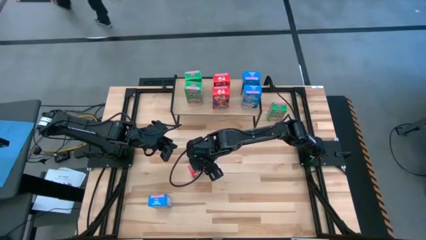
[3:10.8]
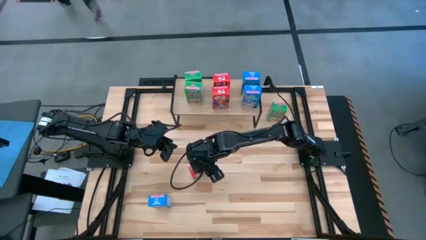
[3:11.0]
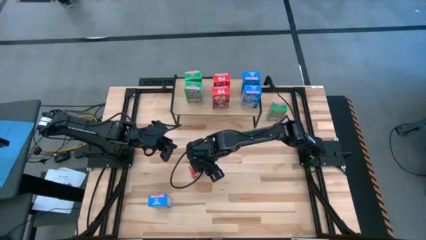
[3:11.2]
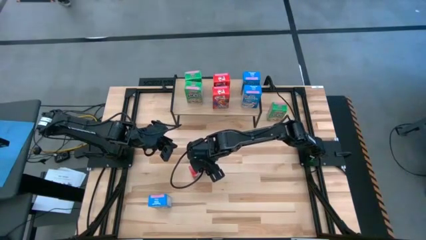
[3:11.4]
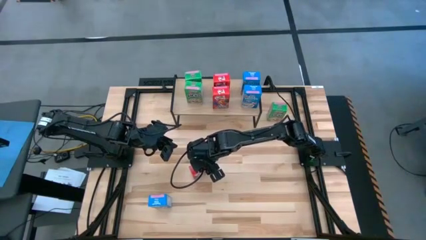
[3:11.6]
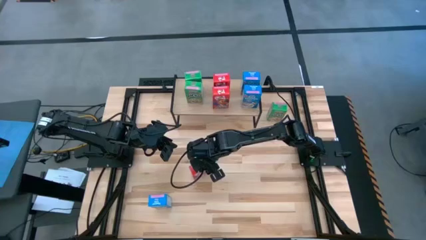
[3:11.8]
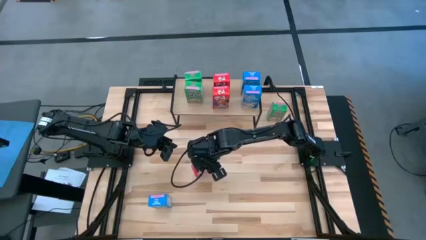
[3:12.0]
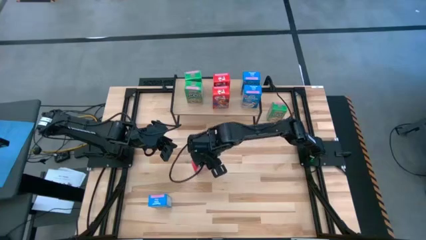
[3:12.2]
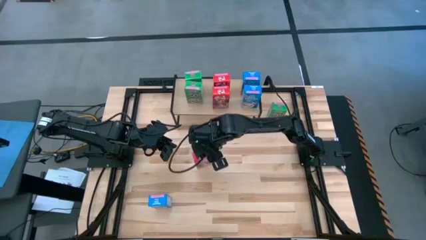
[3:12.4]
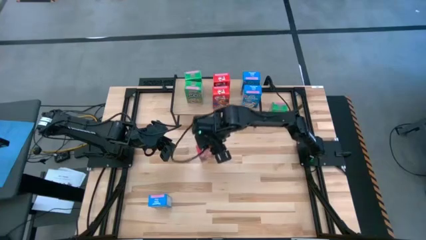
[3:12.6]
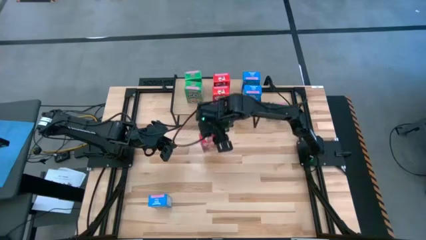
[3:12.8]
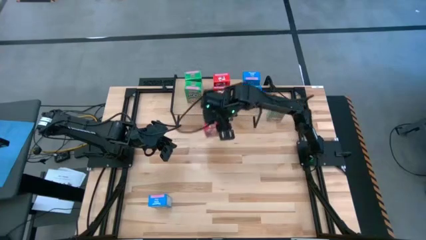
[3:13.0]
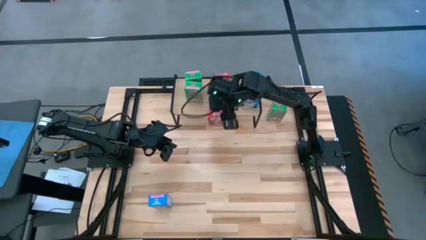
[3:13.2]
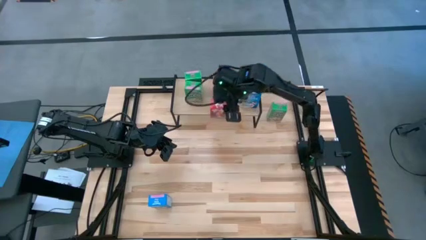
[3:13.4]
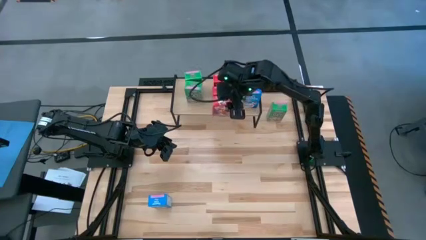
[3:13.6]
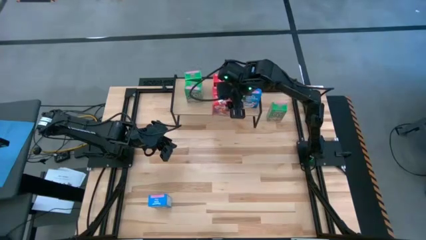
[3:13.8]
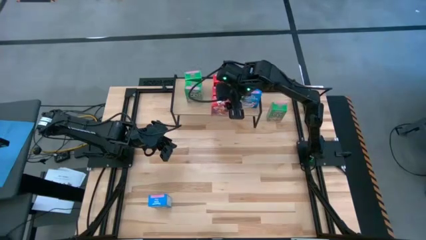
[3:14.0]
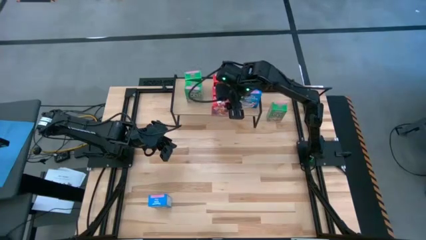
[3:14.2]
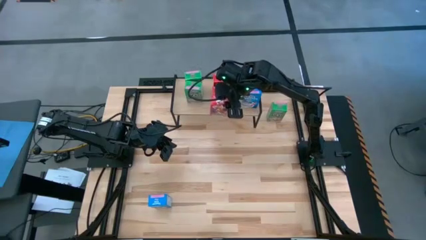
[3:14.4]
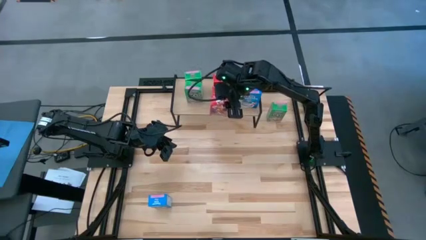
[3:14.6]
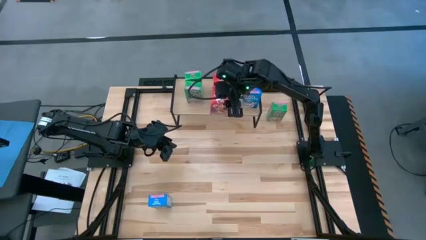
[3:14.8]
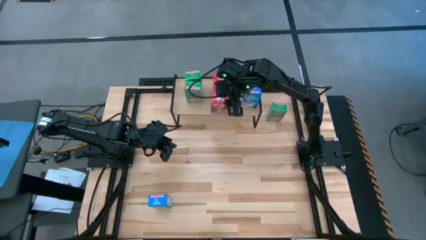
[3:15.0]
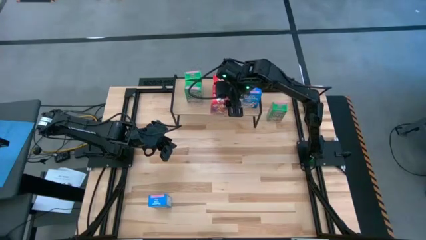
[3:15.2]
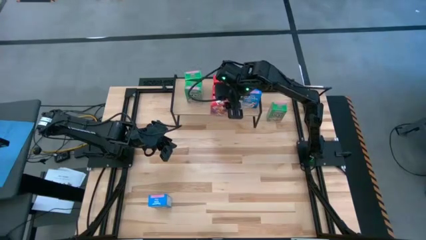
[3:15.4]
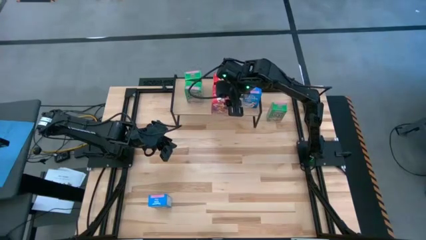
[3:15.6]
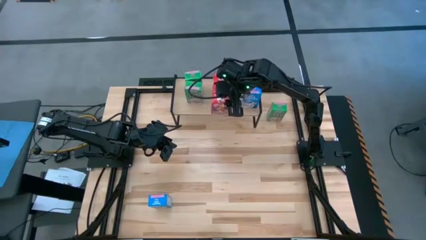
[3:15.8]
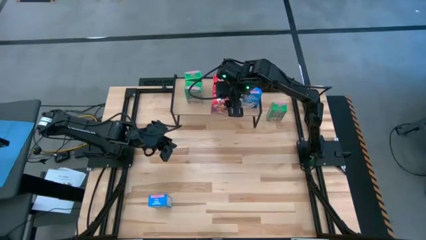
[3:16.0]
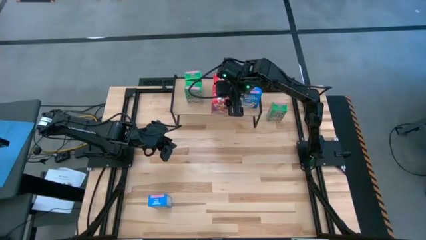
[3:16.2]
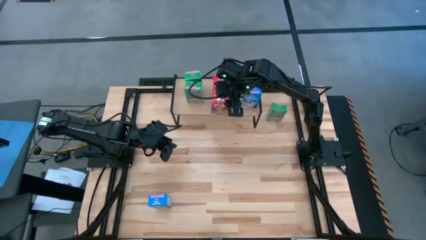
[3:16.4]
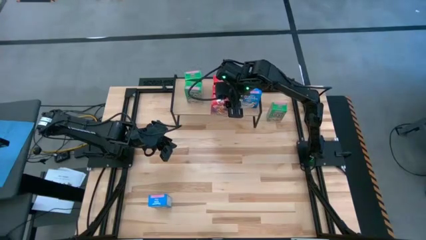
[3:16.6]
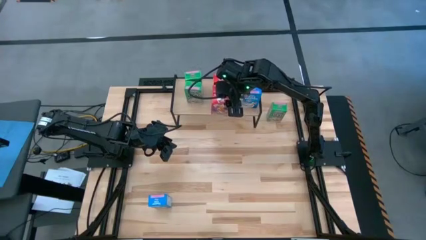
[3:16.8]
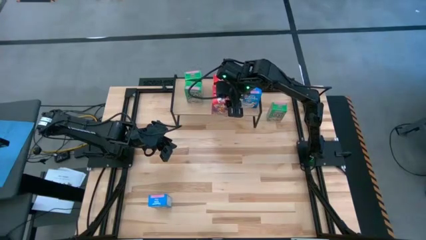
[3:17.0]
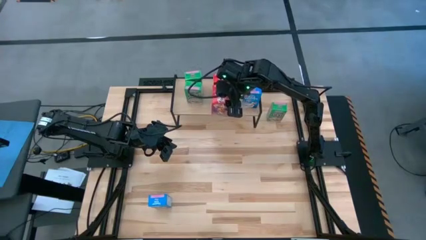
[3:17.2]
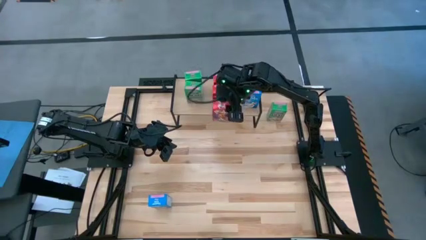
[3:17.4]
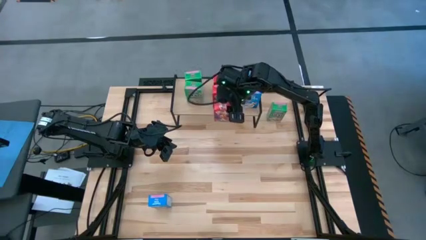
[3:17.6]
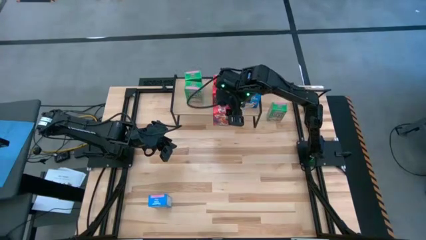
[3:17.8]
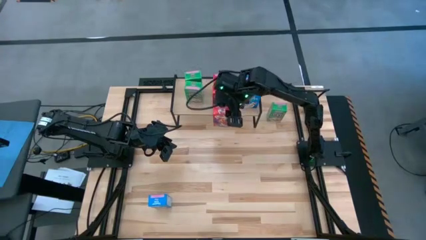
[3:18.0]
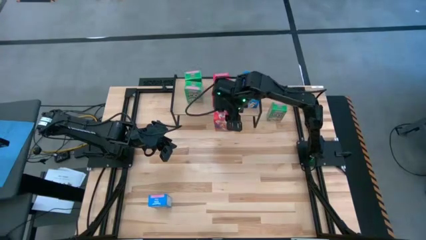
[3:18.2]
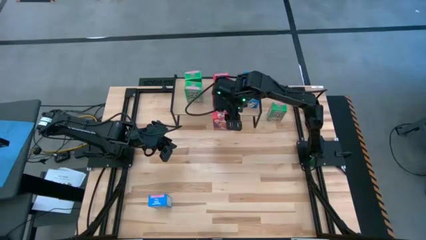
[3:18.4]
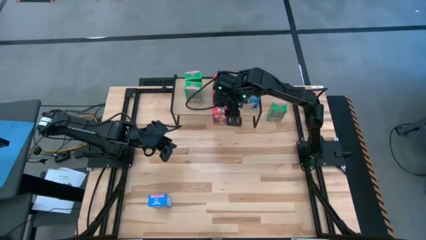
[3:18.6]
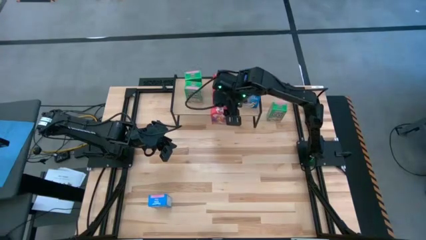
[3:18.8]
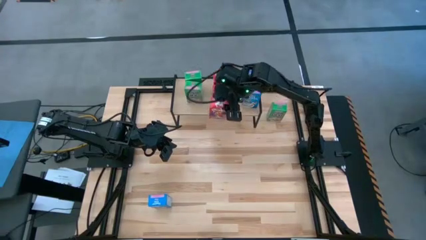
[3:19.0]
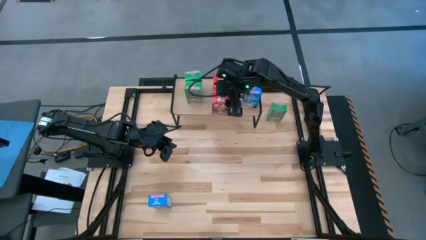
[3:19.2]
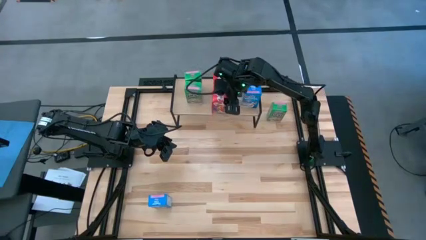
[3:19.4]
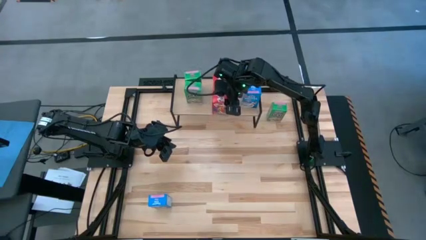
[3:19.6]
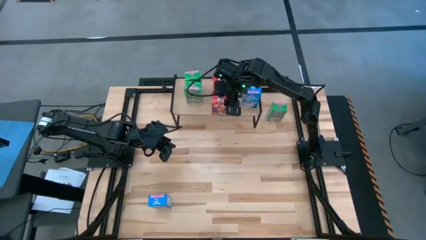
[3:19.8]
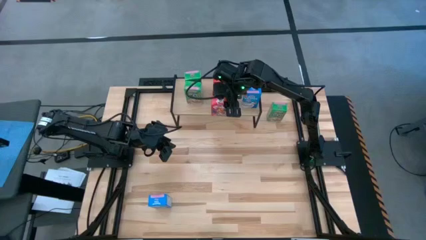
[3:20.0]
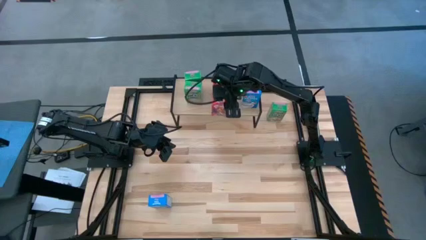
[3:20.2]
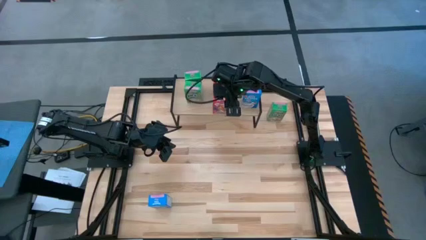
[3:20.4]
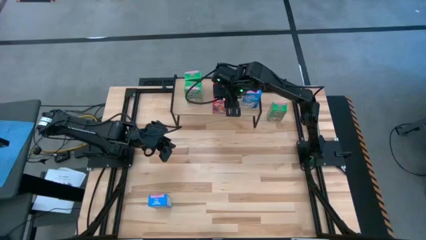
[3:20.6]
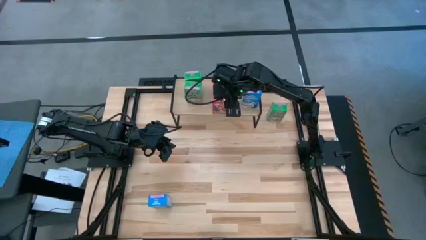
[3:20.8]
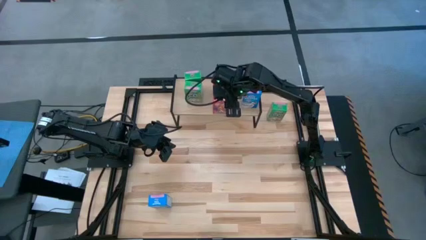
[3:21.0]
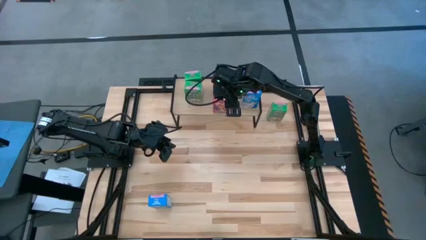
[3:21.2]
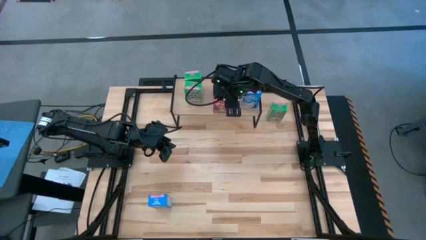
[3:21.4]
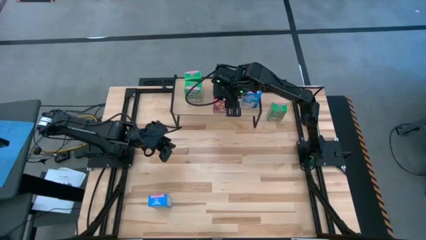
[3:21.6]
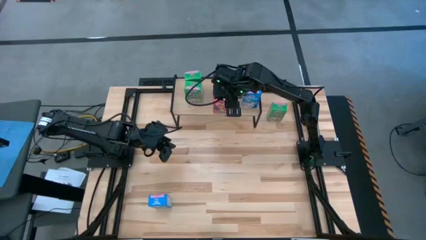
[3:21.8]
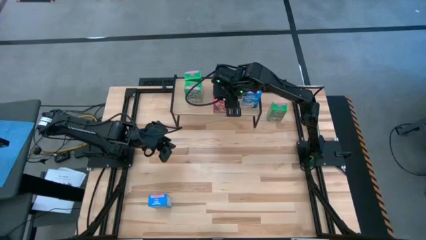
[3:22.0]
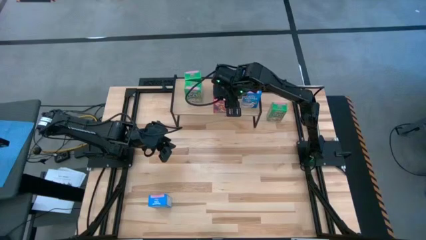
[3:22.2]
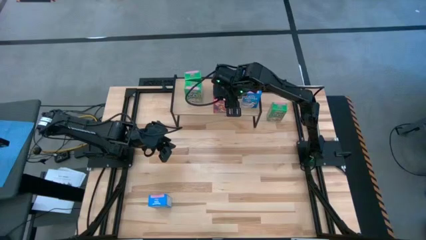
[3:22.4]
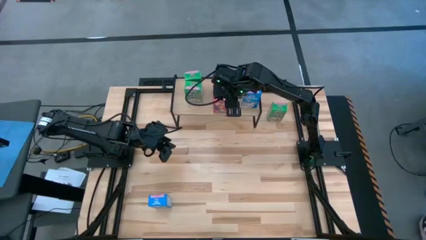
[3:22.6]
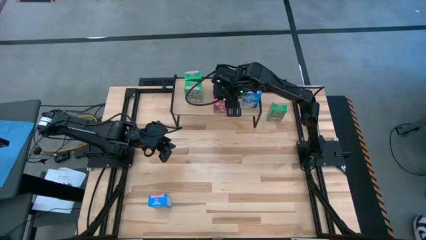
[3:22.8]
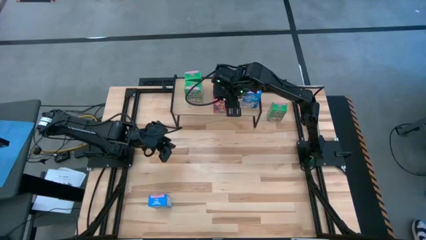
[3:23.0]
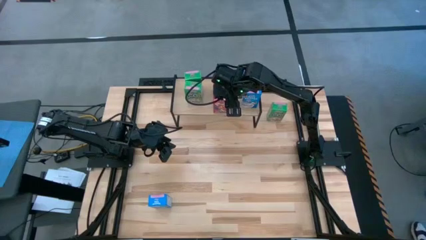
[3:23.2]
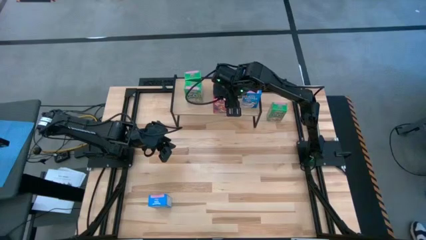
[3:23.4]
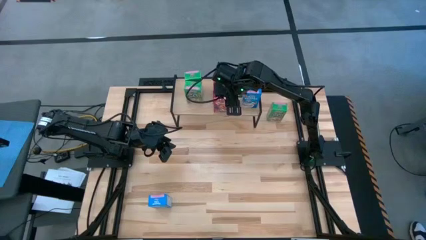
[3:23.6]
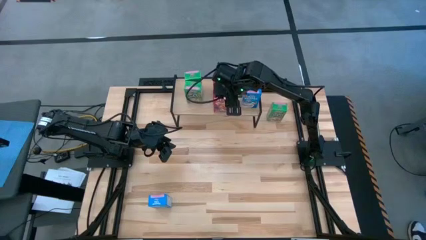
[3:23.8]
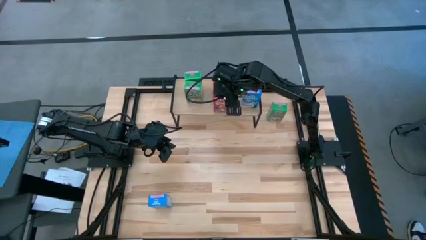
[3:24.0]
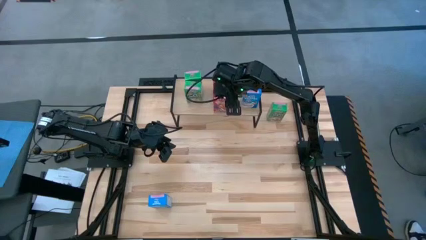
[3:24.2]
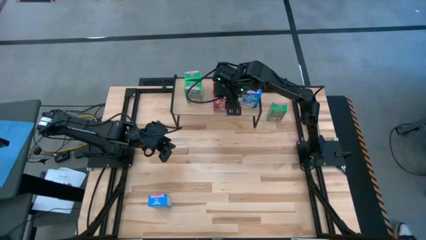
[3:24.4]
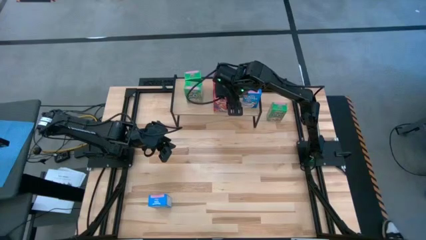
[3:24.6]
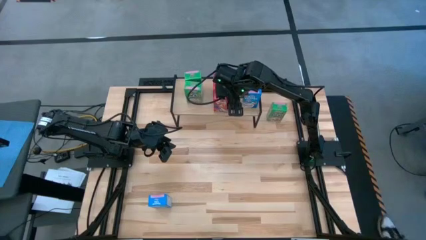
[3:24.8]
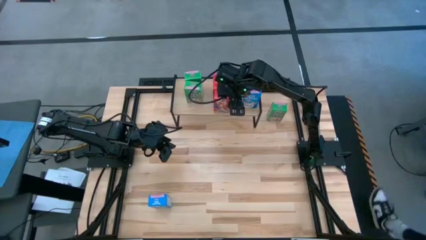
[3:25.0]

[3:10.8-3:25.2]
Task: Stack cereal on shelf
Put the red cereal box on the shelf aligned with the other red cereal boxes
